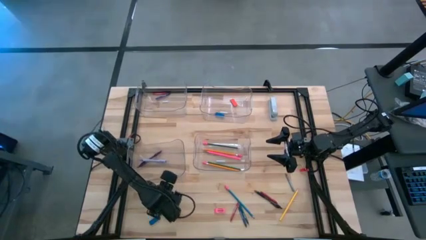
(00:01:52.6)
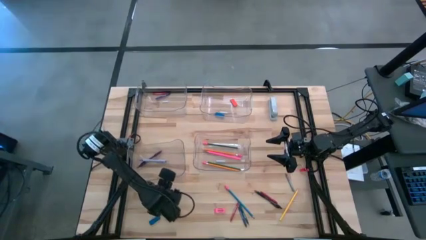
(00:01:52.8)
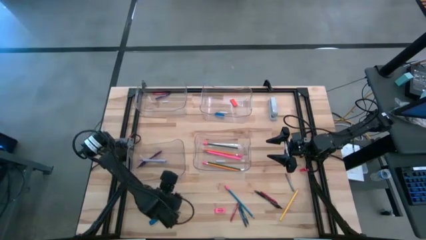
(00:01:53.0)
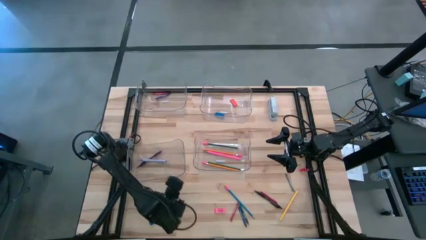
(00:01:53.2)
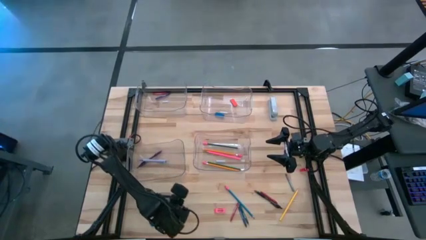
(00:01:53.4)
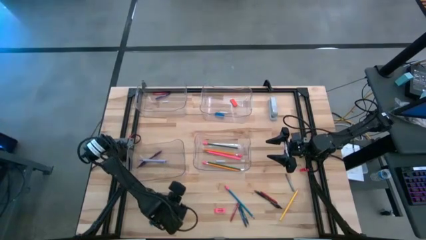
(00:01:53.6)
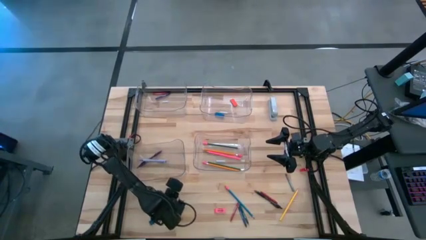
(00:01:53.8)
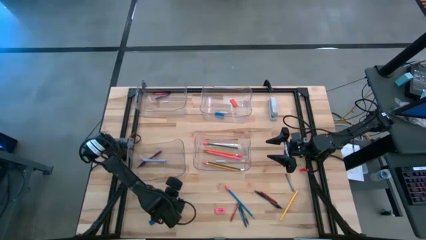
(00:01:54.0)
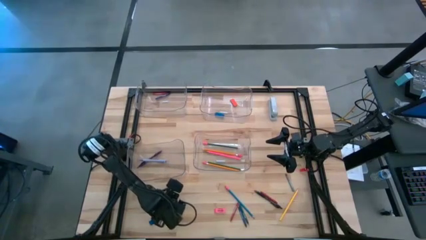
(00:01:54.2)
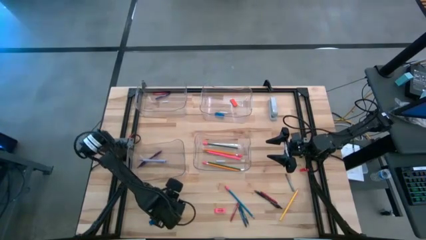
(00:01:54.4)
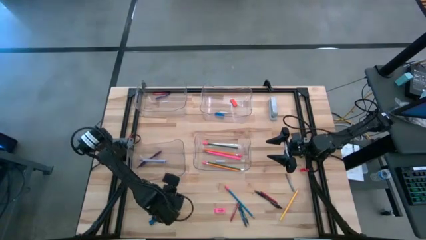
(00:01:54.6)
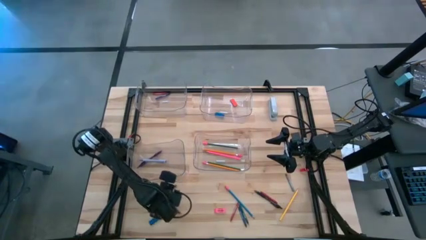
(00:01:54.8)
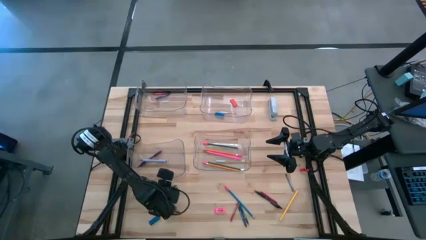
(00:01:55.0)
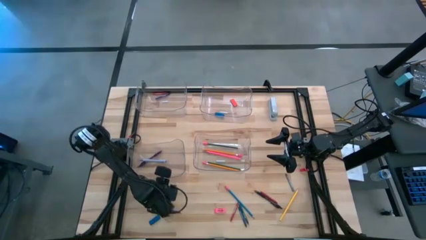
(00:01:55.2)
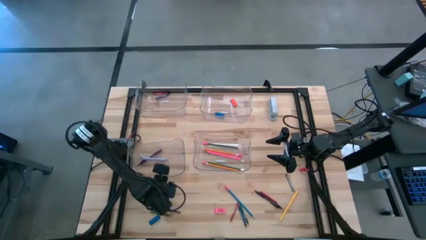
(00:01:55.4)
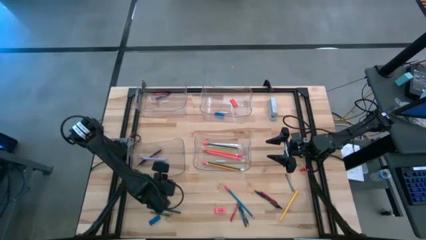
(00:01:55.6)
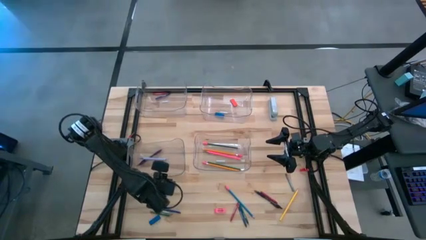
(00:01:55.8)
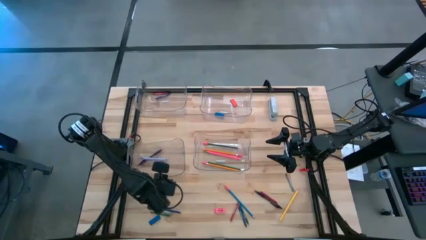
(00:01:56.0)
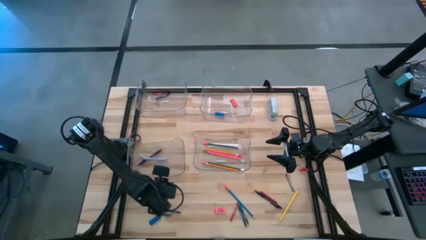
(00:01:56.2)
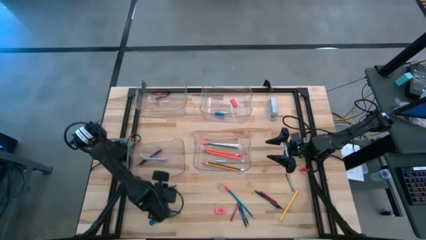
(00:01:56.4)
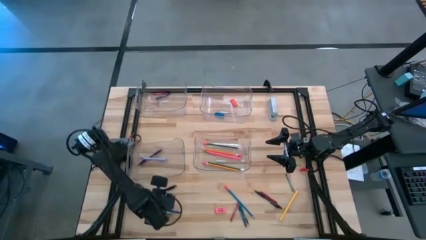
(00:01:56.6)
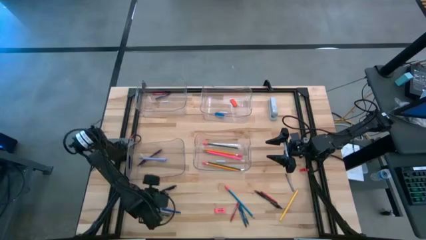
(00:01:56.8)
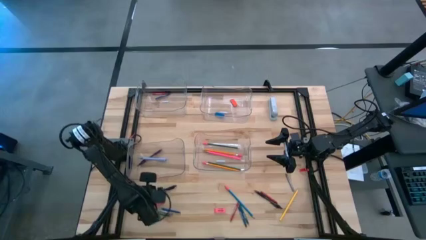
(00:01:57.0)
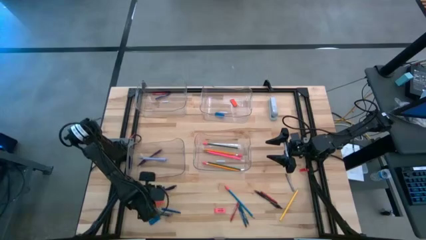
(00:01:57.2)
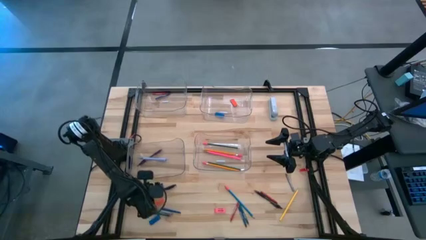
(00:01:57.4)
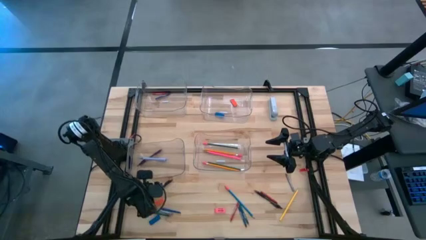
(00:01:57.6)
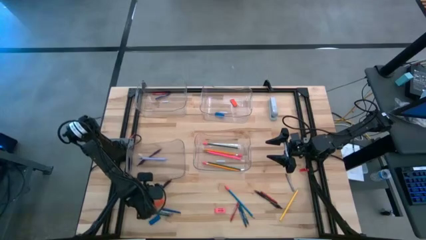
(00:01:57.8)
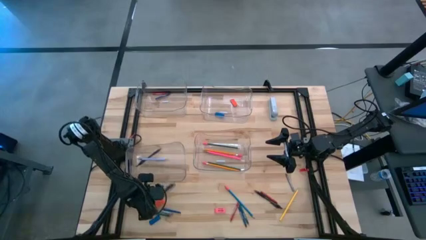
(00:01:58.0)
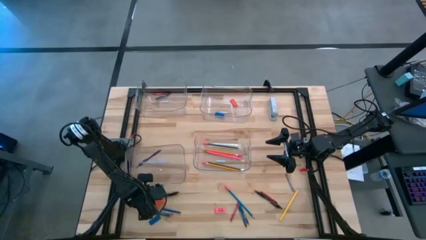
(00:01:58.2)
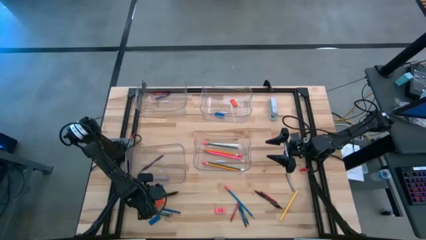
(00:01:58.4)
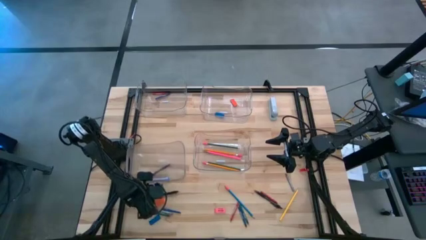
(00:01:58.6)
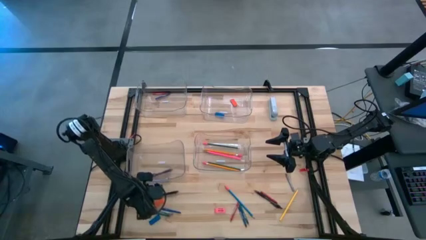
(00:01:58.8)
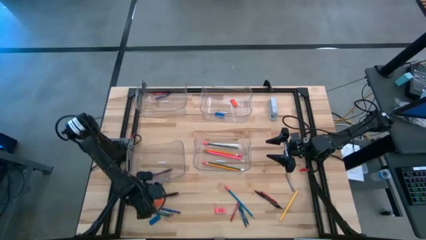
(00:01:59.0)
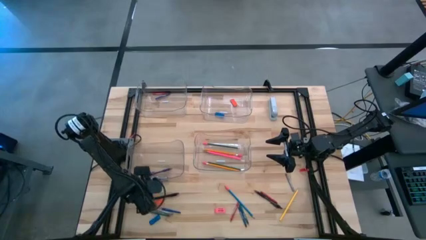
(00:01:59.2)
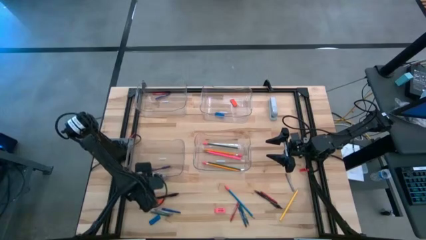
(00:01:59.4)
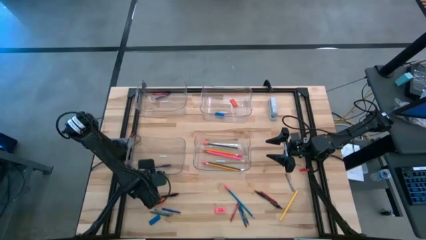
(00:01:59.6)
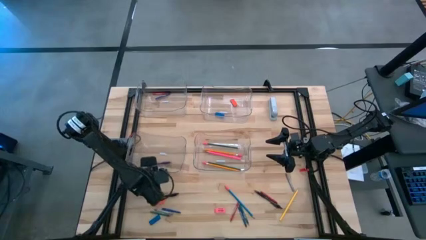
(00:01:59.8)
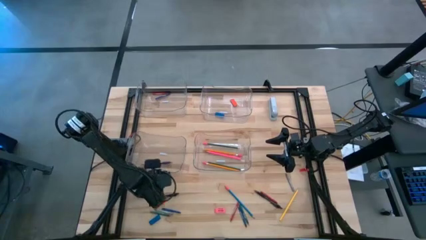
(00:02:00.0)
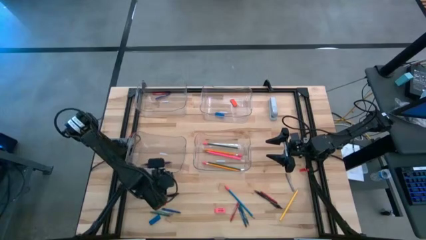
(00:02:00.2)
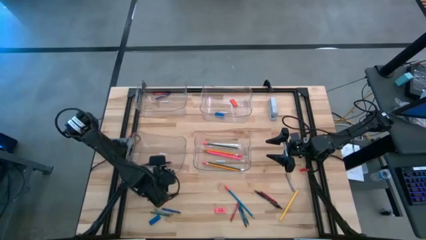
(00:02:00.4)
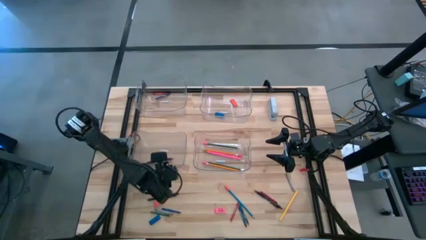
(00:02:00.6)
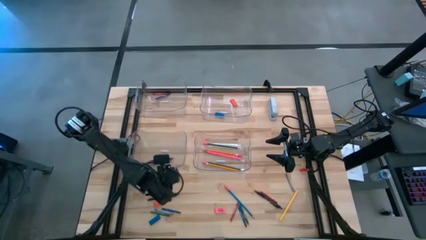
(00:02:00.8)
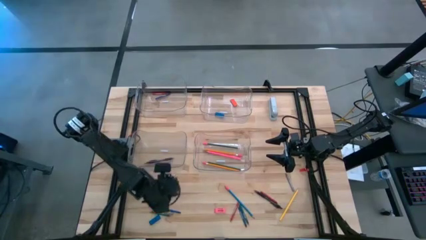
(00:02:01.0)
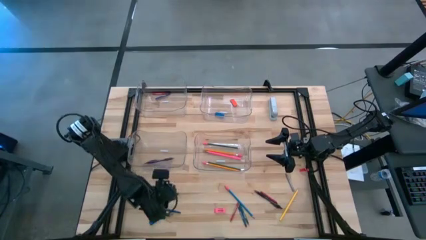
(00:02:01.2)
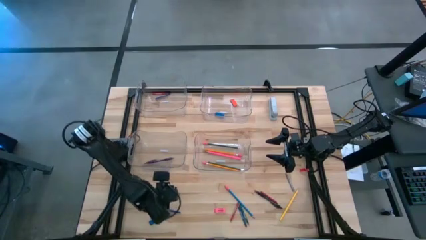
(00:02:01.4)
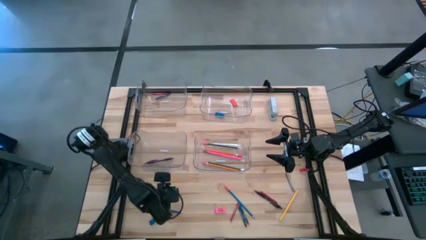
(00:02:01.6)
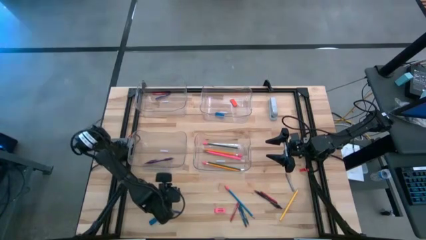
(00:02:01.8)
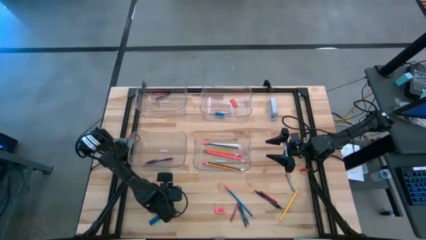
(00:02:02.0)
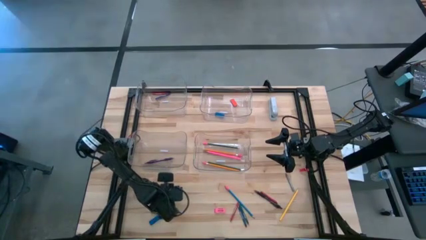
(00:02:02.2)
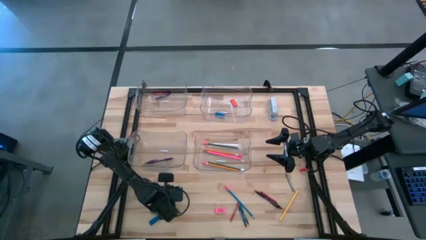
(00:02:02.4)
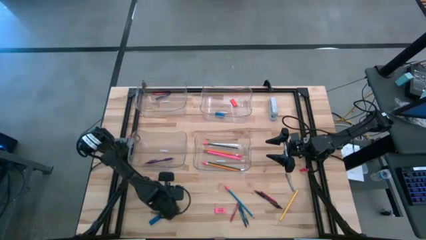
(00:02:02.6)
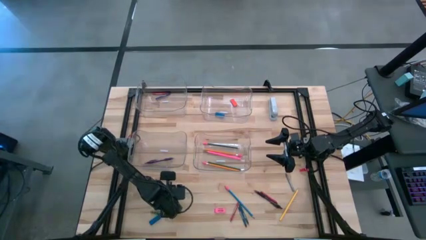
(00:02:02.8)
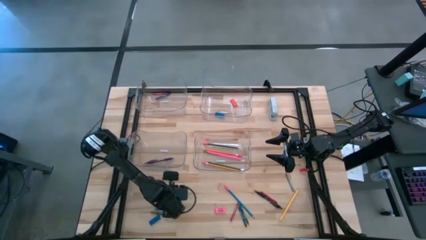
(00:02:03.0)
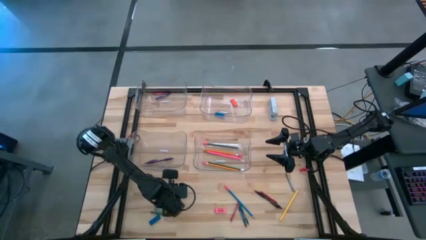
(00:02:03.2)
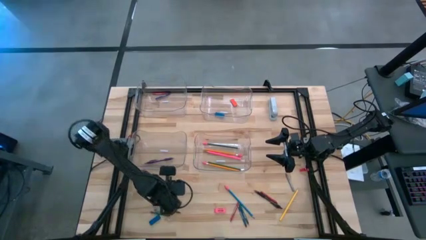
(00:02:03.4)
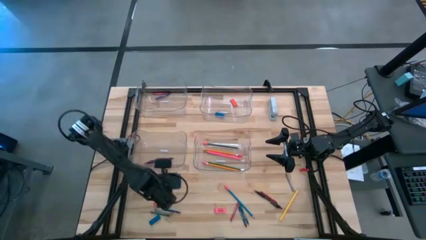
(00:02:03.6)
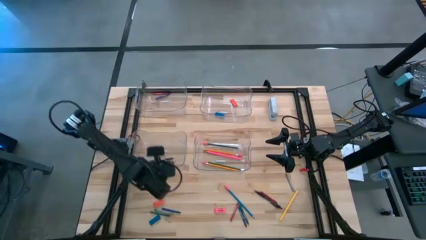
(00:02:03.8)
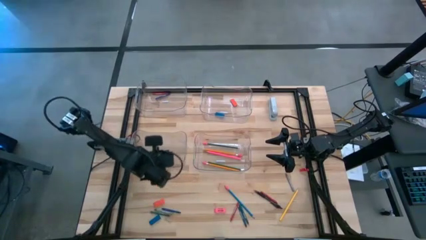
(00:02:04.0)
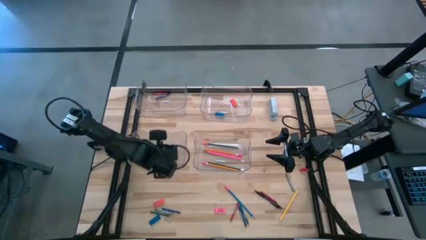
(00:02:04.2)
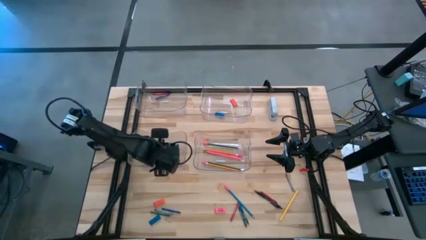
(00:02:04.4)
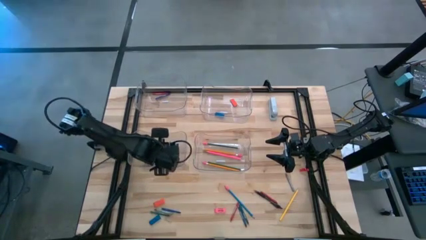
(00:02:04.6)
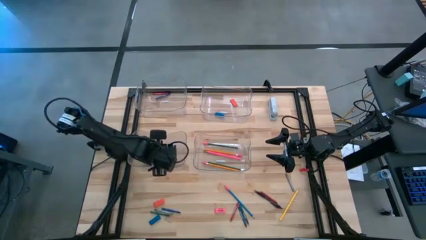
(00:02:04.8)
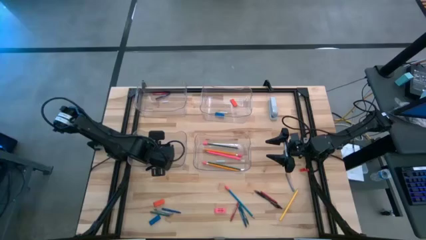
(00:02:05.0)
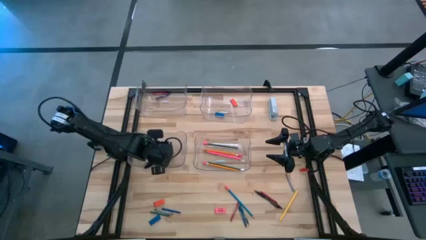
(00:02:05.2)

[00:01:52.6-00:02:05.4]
Task: Sort crayons/erasers/pens/pencils in bins
Put the left black pen into the bottom left transparent bin
